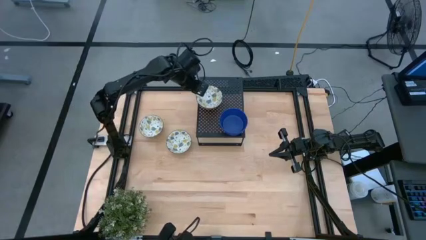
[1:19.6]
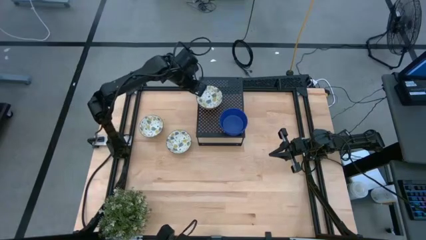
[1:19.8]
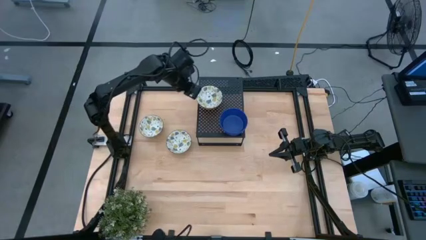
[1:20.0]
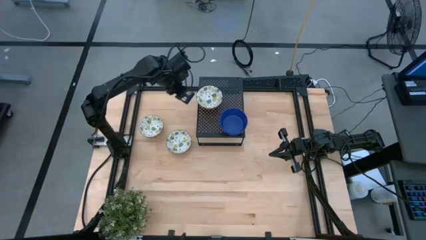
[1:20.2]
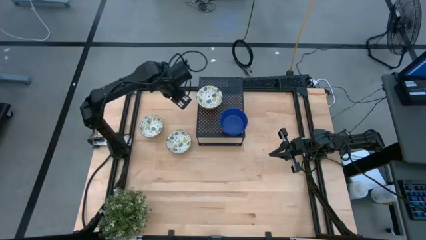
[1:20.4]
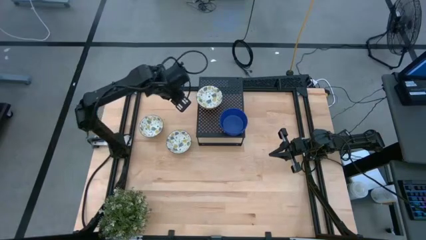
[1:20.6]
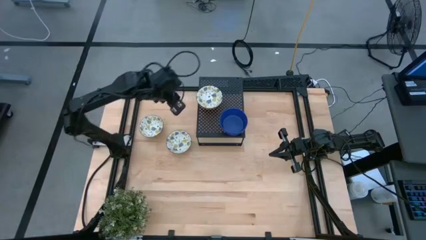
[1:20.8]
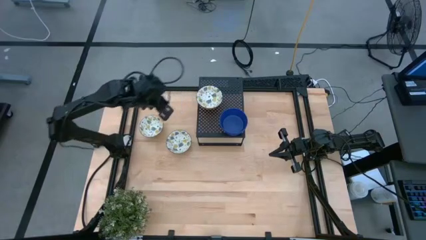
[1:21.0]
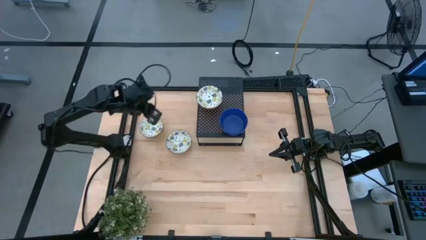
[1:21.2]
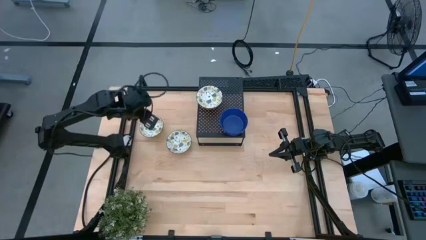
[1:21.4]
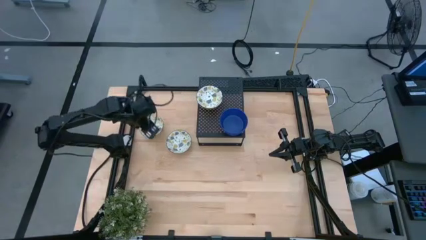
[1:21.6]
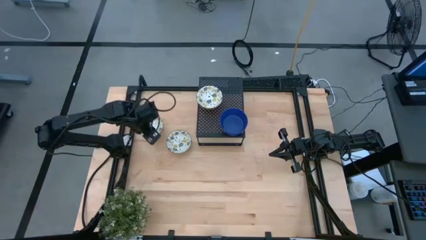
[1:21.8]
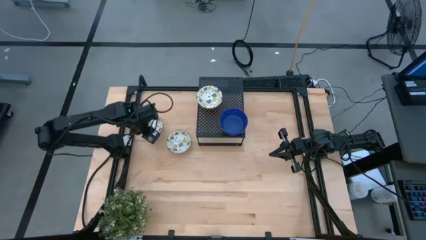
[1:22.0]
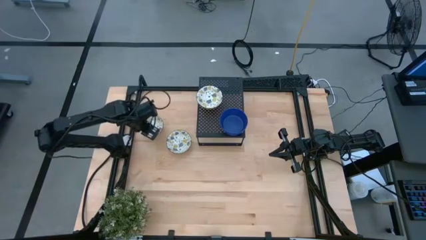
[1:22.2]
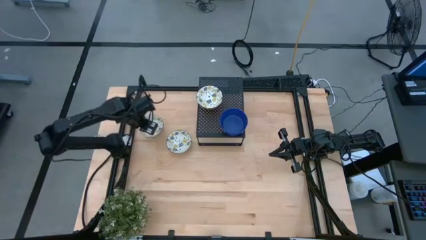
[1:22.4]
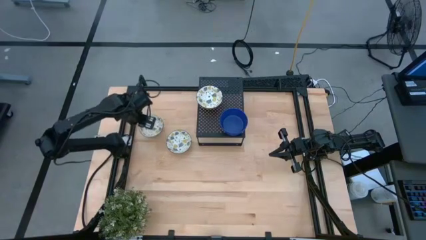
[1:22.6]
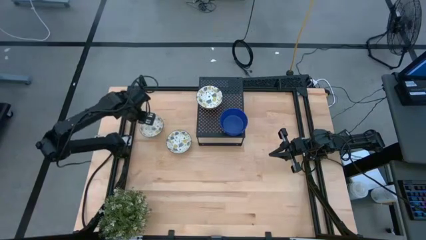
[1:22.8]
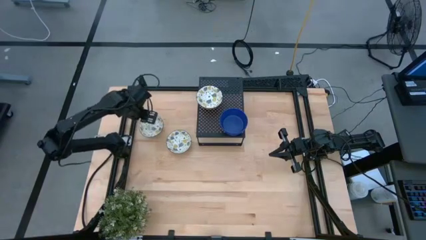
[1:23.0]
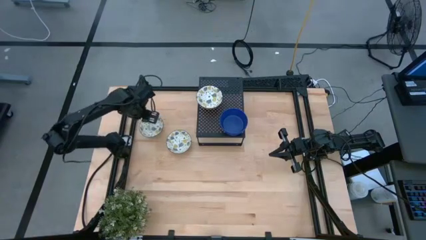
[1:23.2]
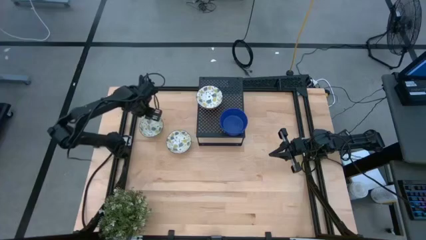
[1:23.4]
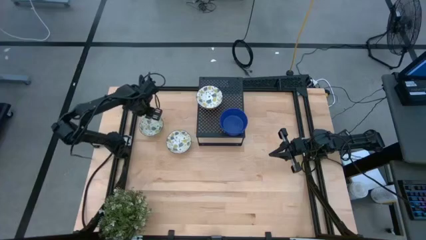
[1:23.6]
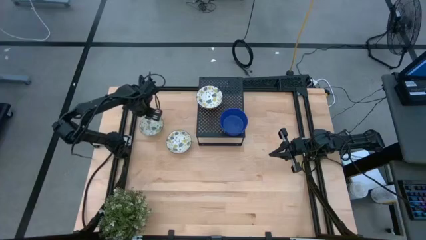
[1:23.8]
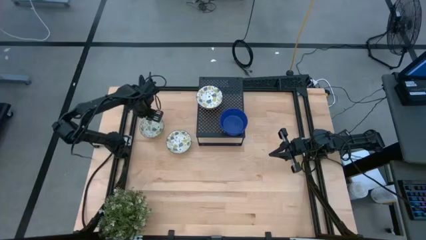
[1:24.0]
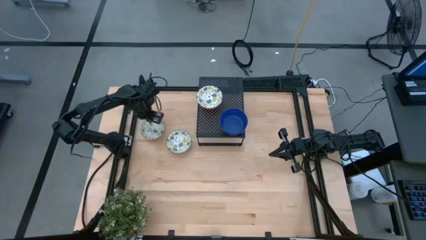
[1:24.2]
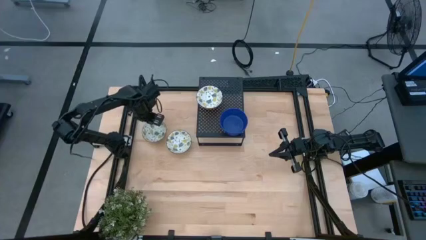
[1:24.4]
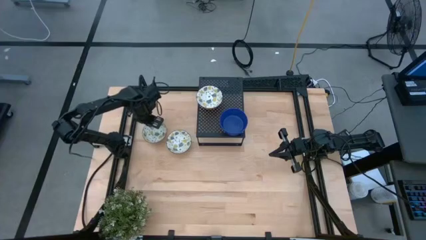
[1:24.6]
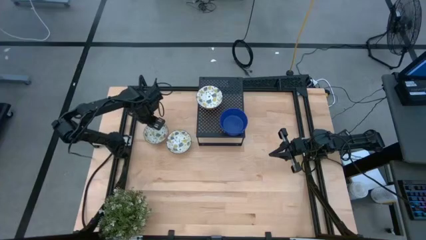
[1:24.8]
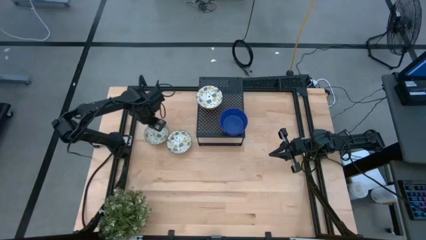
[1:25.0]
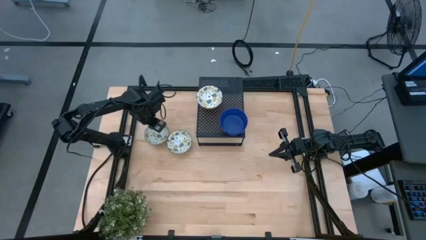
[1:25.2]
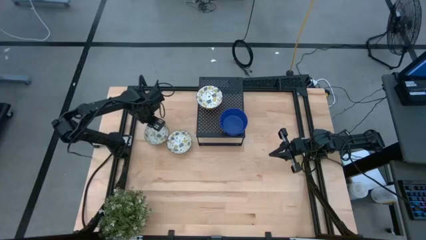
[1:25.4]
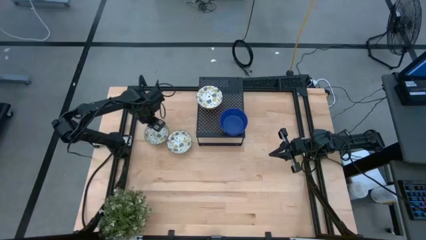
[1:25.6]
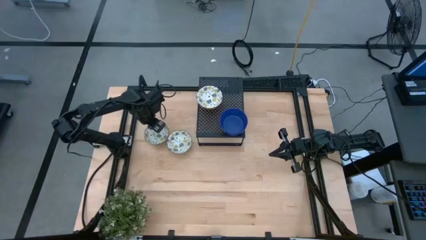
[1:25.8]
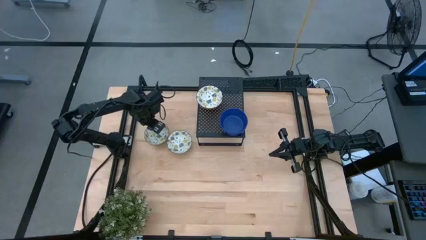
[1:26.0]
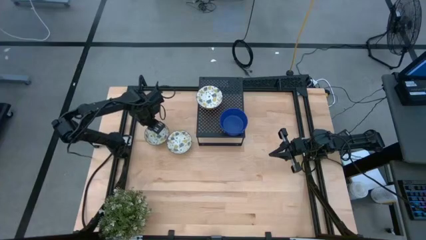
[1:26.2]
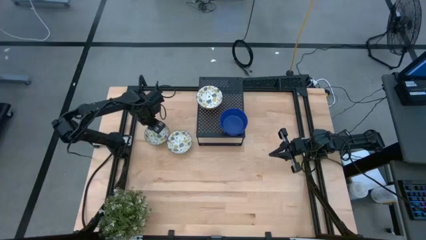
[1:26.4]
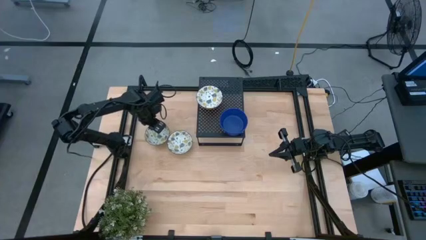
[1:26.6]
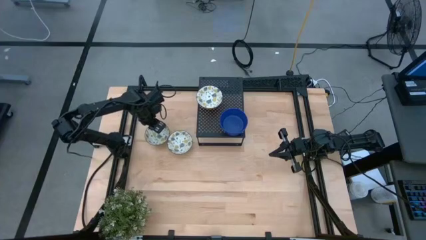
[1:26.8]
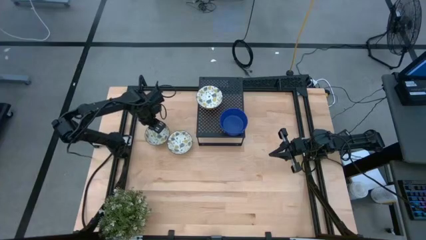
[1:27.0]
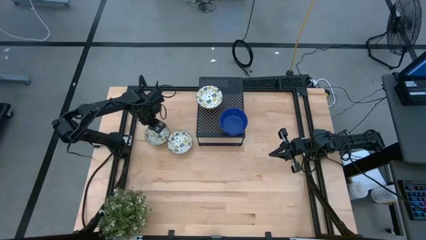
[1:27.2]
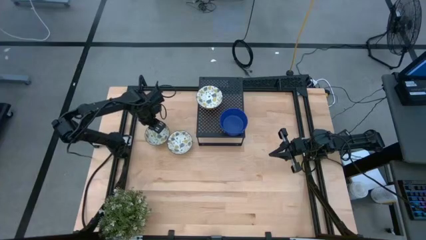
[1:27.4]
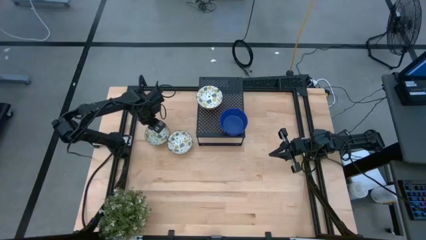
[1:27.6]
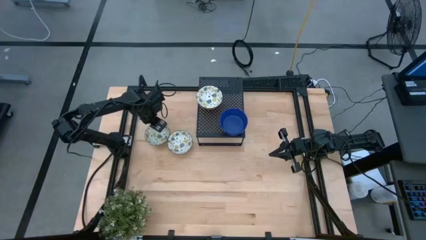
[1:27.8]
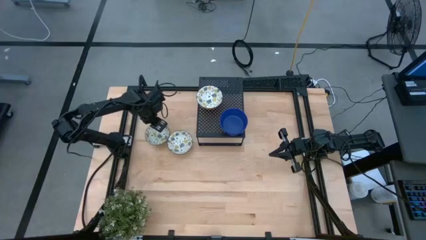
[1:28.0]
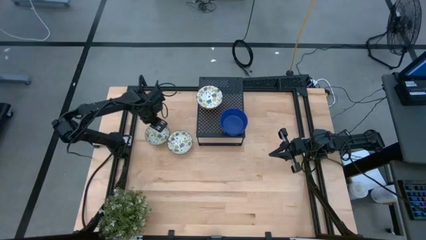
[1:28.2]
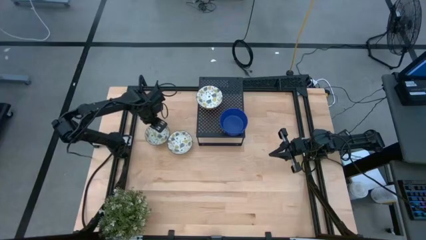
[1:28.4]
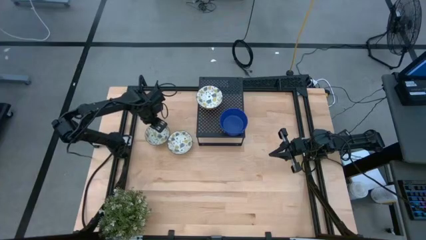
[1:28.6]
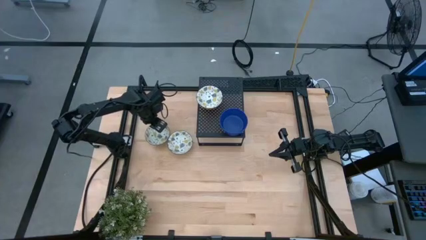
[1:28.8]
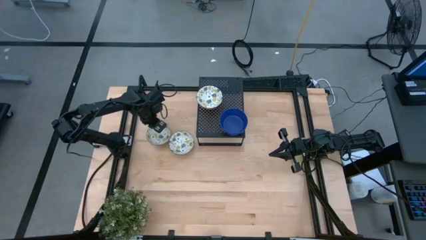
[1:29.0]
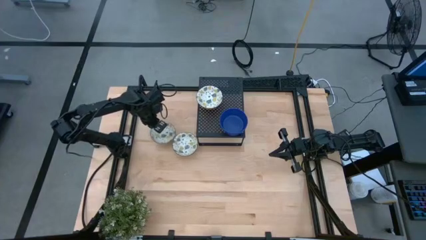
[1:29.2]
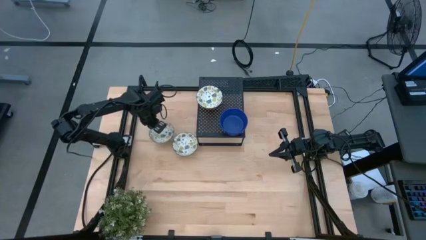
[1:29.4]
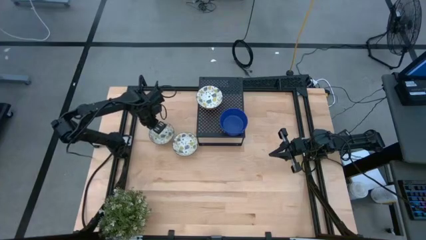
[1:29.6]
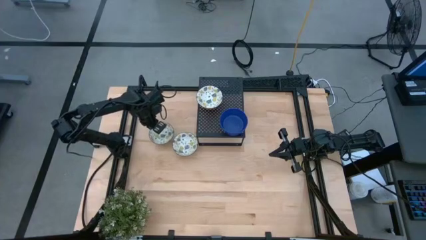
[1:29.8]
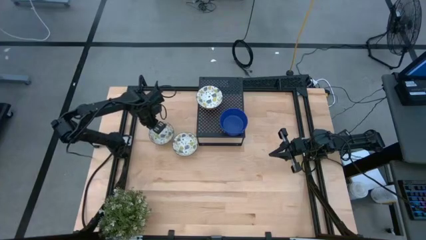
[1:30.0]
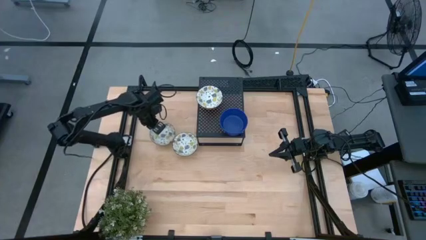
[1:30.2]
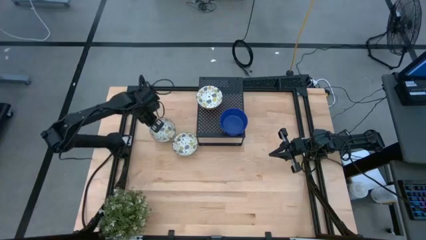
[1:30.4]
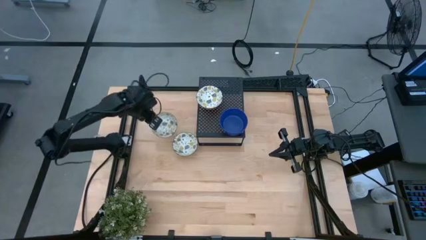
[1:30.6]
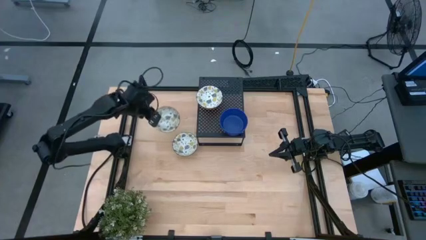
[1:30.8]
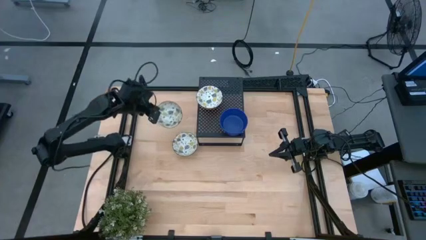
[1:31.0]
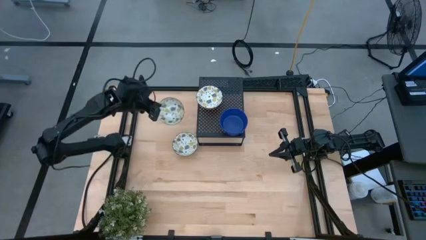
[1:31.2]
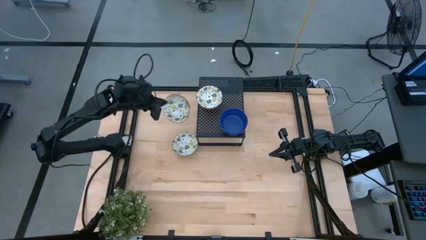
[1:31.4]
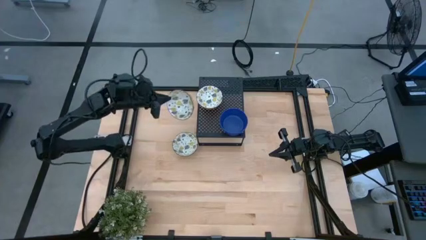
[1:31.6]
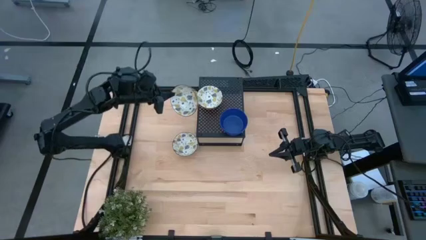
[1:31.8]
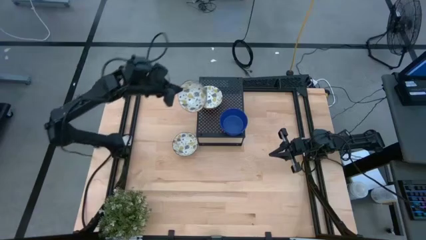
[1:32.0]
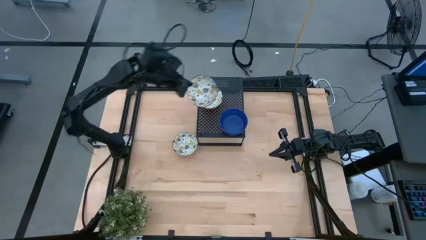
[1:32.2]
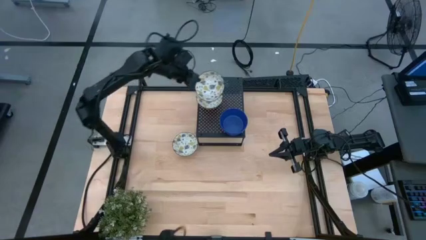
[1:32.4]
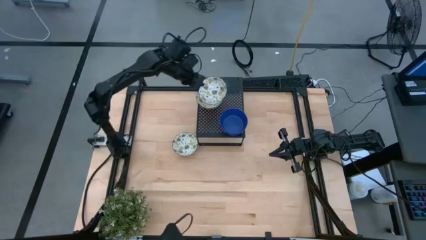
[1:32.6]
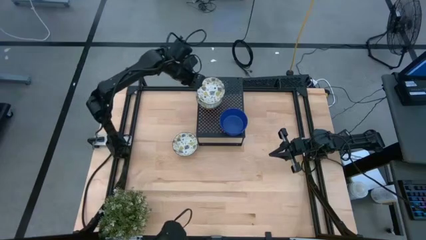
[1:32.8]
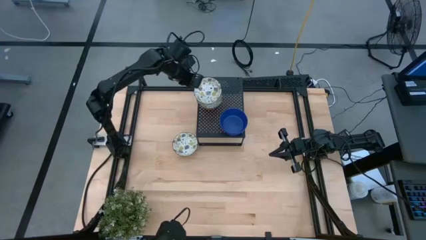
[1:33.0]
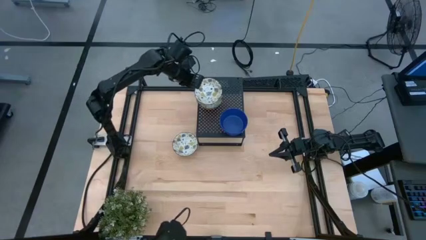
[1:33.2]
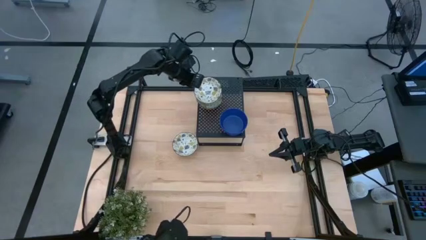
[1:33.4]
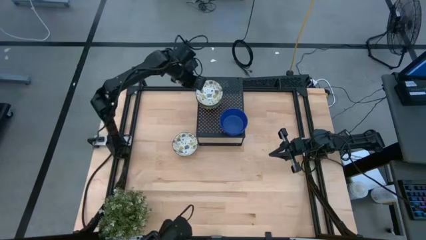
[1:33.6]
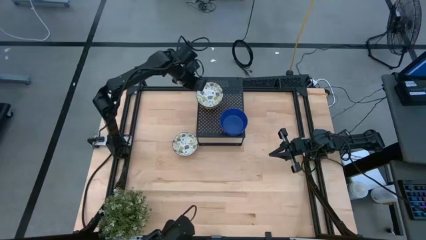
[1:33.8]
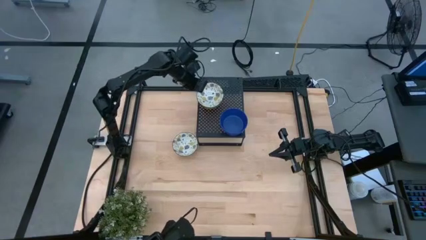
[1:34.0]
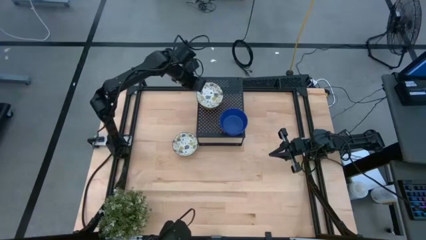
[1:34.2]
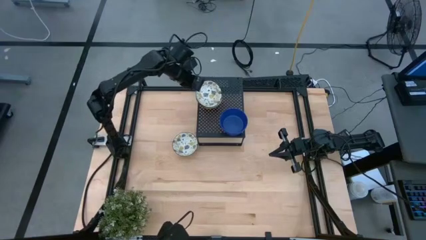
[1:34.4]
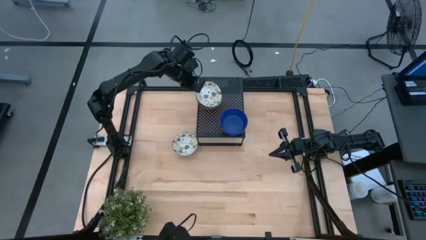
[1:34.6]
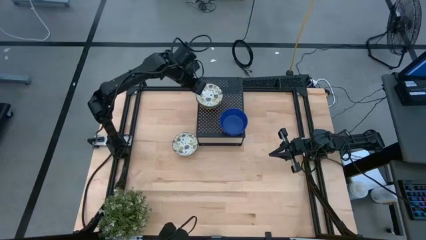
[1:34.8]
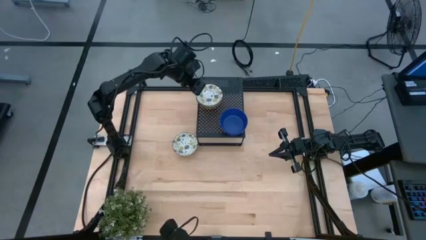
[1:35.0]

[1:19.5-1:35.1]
Task: Pick & Place Mini bowls
Stack the top white bowl on the white bowl on the shelf

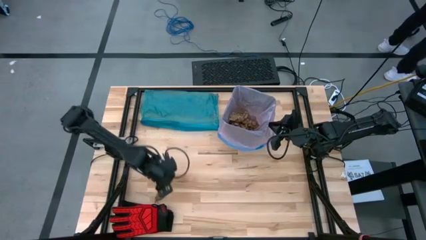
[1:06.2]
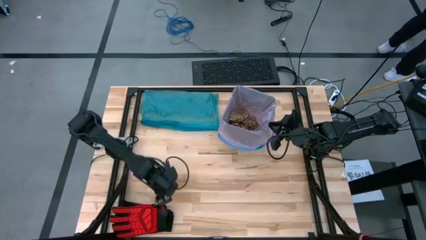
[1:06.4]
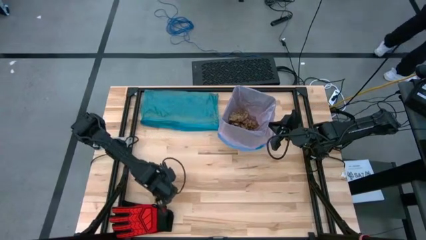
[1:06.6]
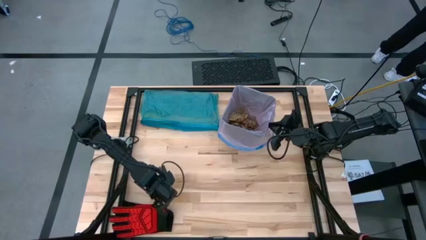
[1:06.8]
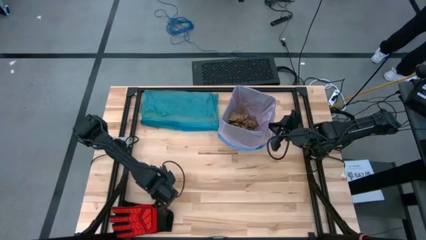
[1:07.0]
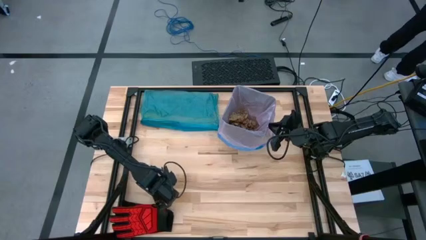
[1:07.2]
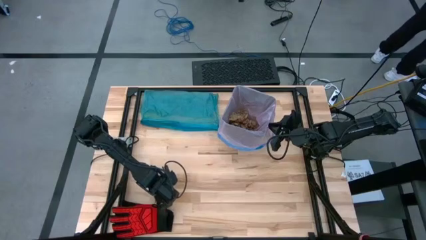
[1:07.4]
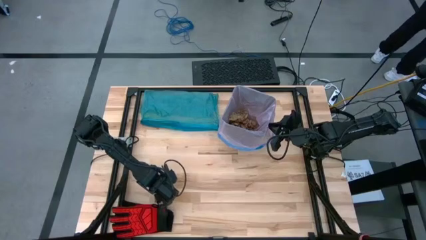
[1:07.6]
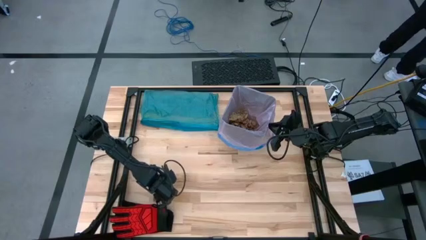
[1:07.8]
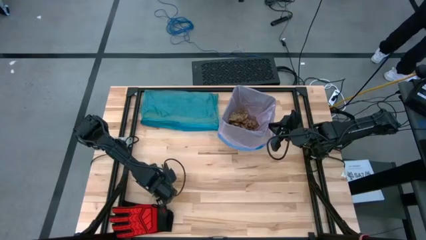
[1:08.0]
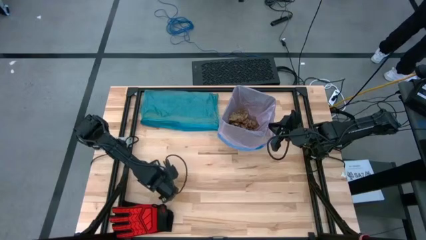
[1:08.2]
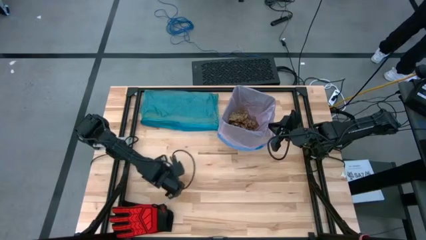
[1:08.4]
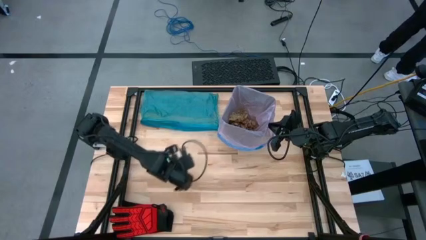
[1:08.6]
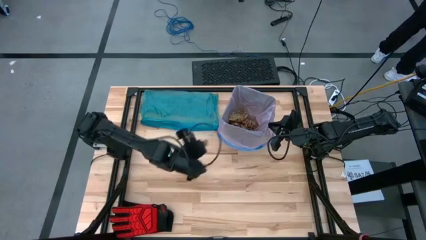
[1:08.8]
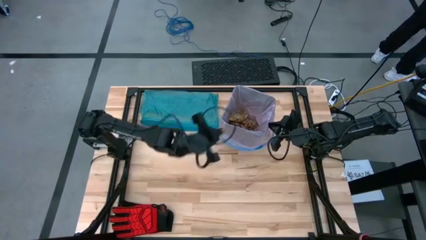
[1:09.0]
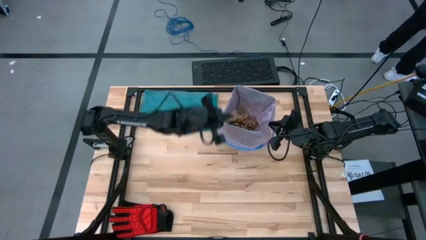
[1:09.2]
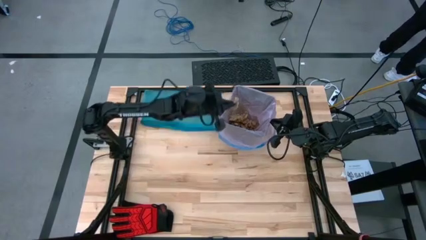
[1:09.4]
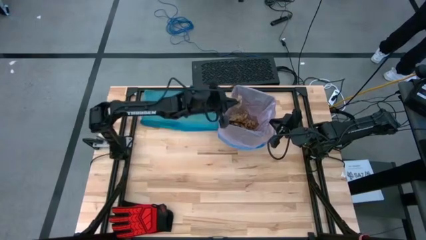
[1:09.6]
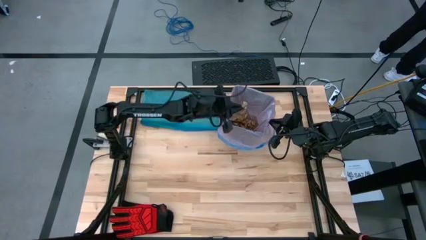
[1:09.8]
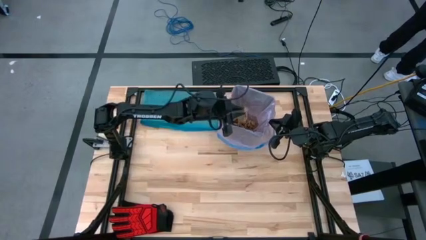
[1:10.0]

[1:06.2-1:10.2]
Task: place trash/remove bag and relplace
Put the brown napkin into the trash bin
